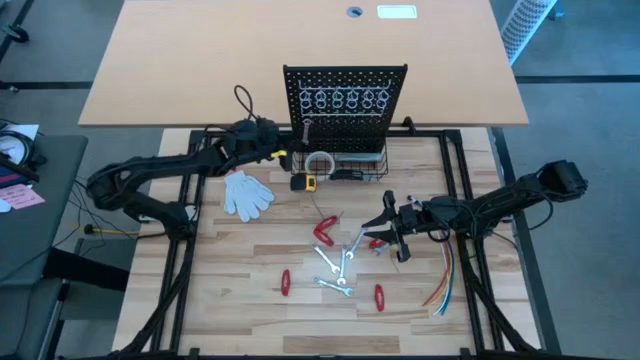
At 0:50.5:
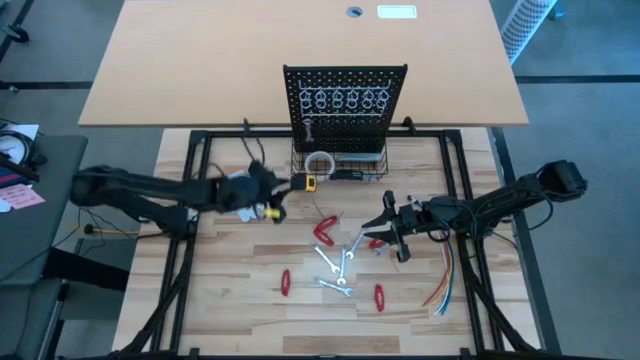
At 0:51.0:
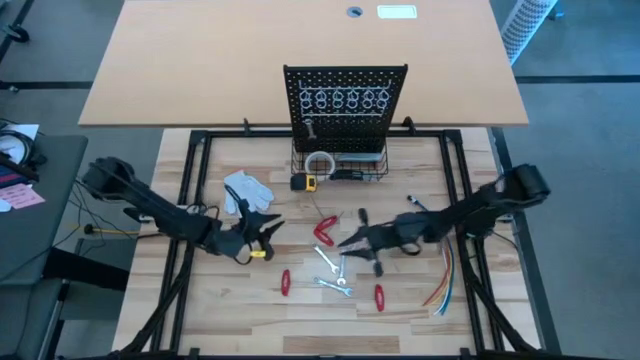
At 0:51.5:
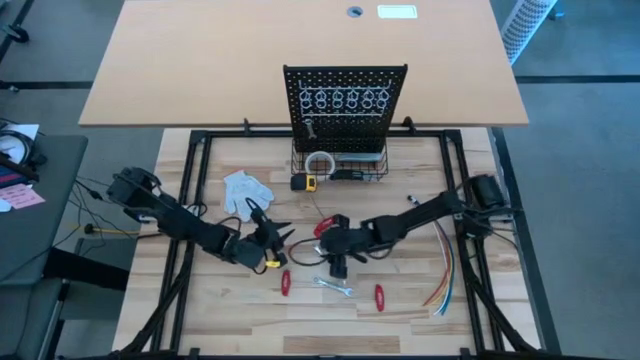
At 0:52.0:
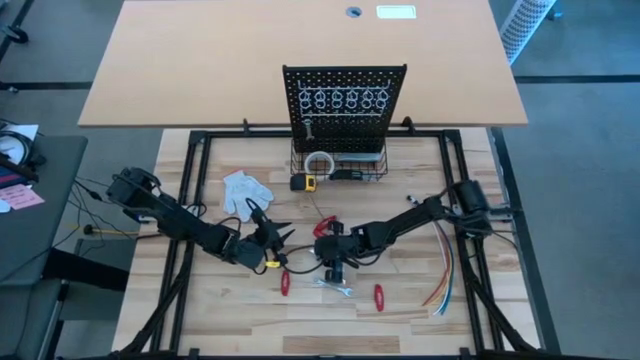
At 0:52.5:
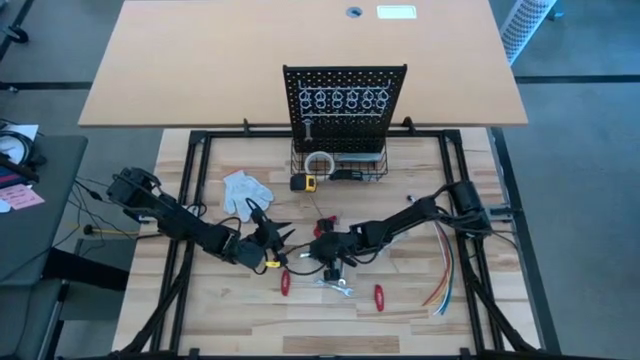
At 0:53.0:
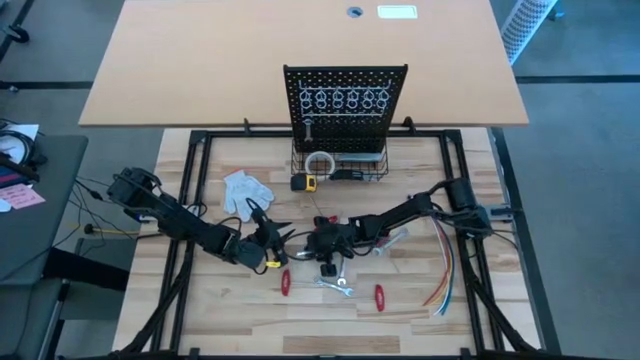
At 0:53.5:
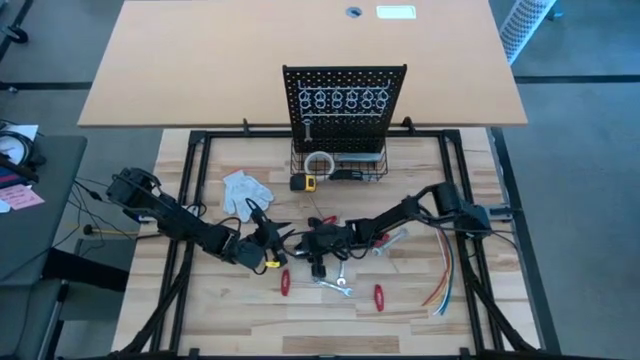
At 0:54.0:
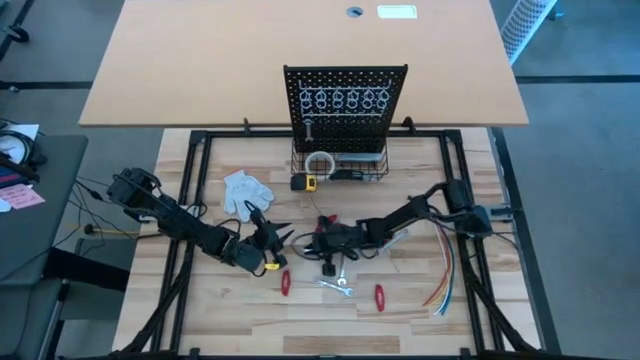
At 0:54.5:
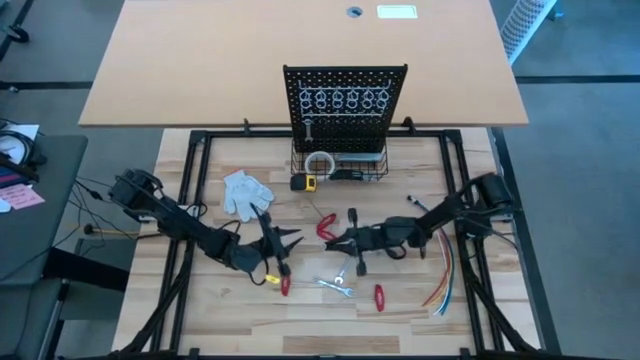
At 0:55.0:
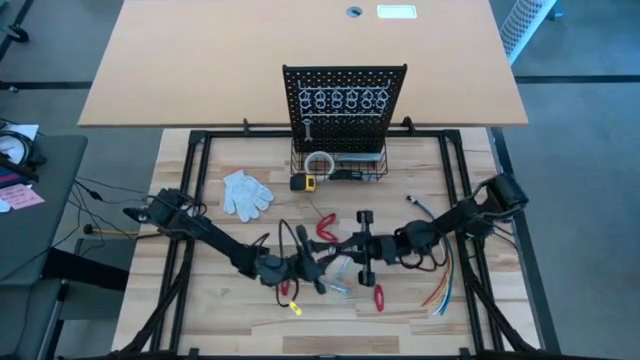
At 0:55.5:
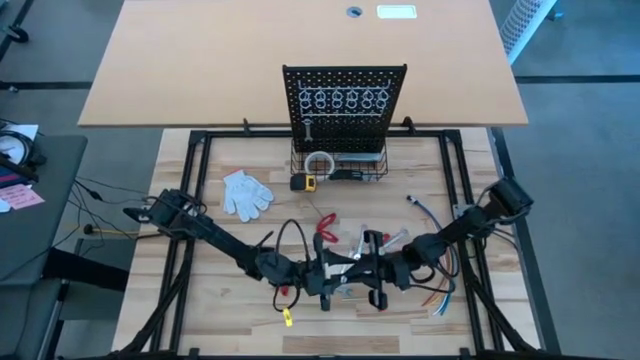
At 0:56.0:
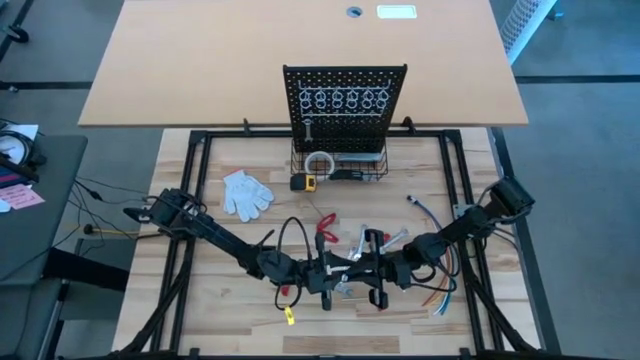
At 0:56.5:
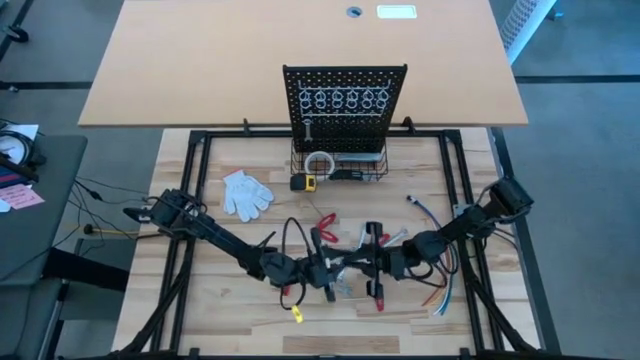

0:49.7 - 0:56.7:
Task: Hang tools onto peg board
Hang the silver wrench on the peg board

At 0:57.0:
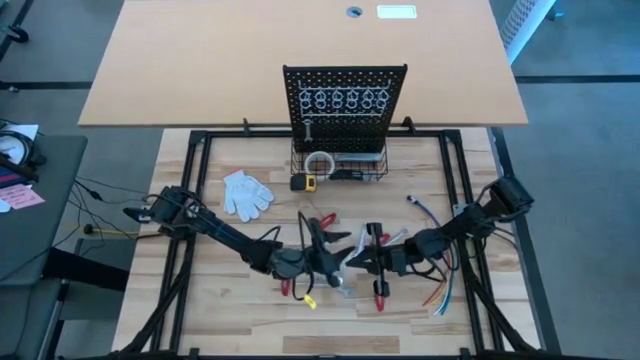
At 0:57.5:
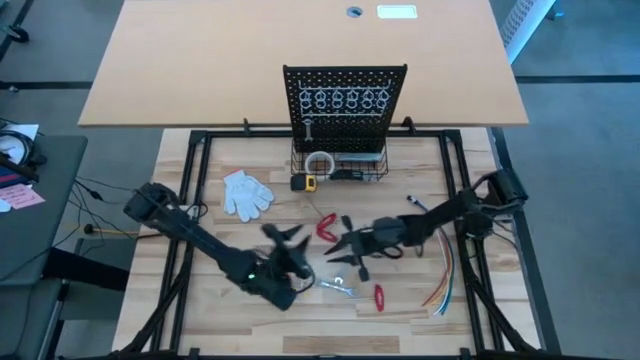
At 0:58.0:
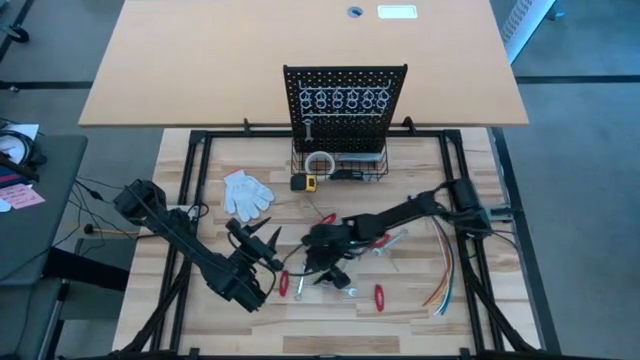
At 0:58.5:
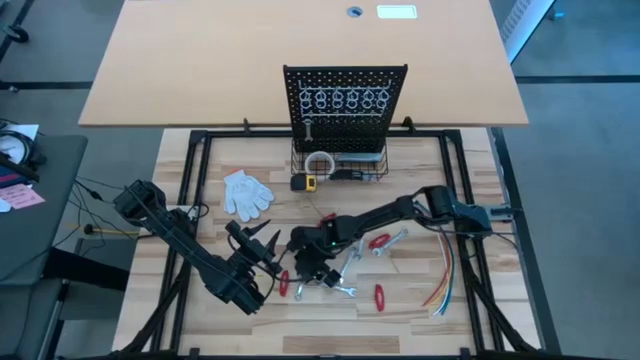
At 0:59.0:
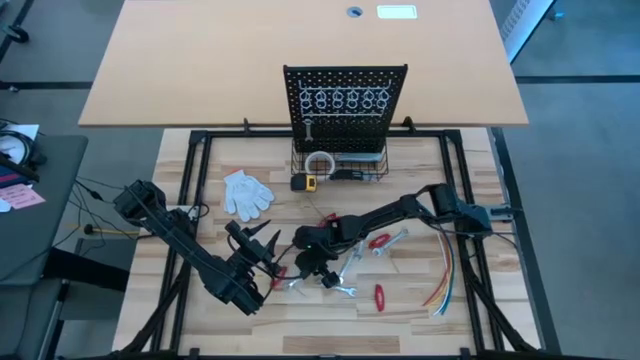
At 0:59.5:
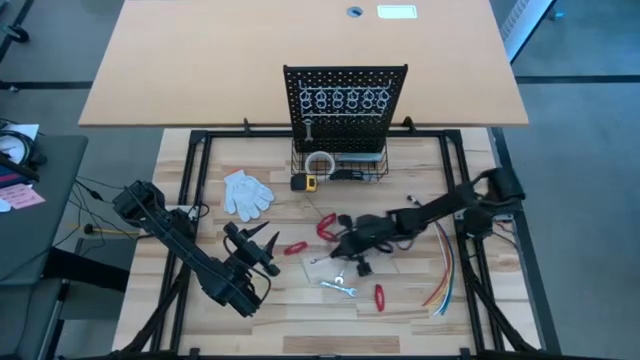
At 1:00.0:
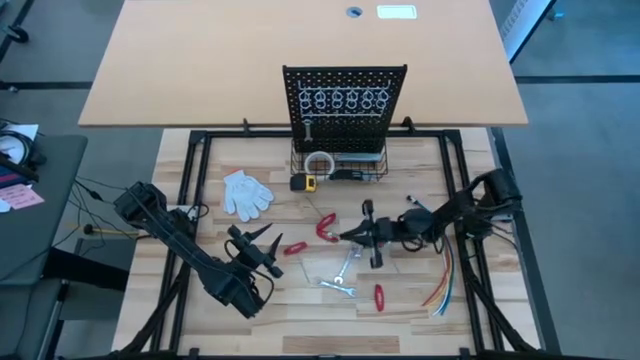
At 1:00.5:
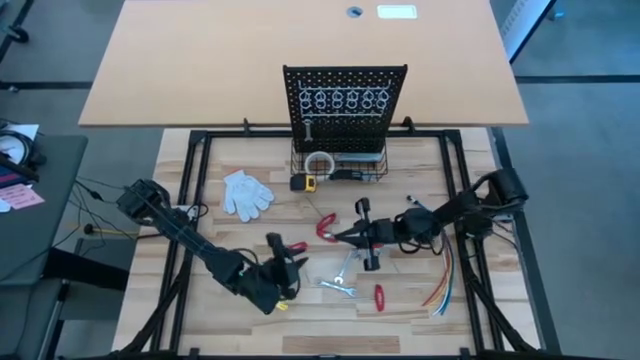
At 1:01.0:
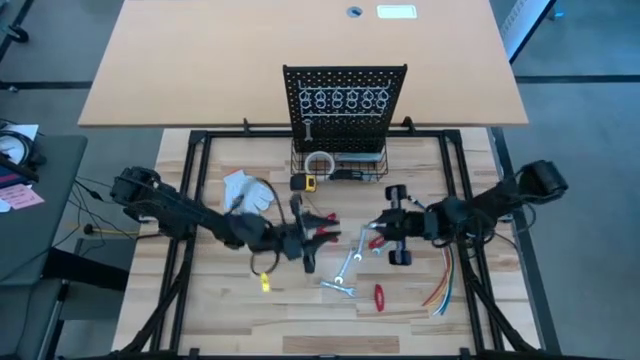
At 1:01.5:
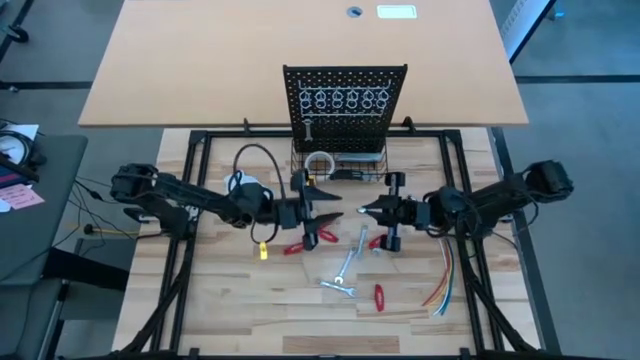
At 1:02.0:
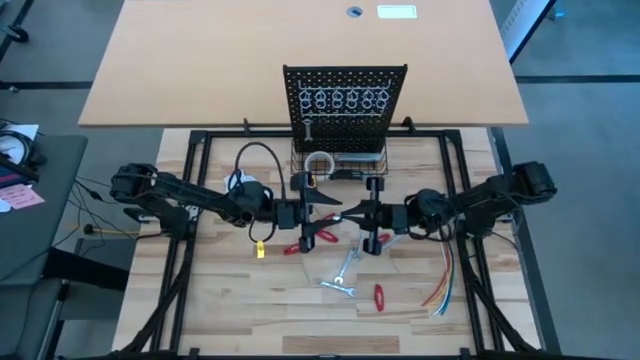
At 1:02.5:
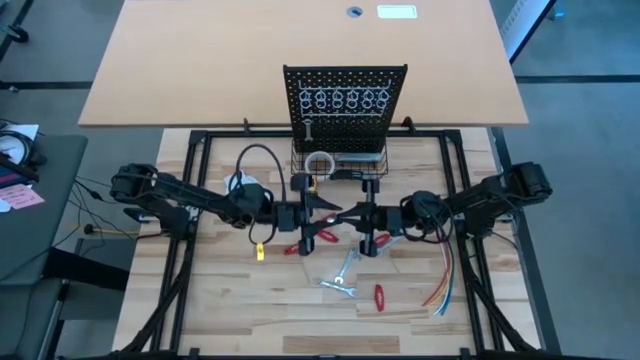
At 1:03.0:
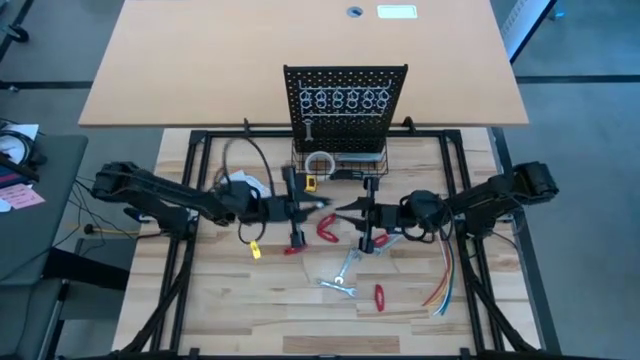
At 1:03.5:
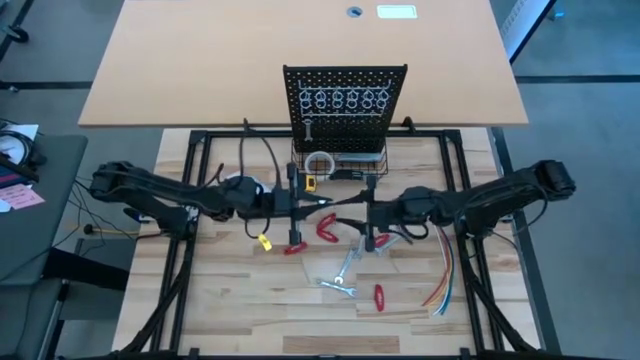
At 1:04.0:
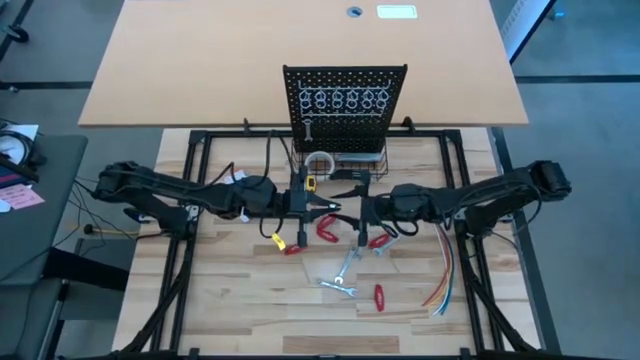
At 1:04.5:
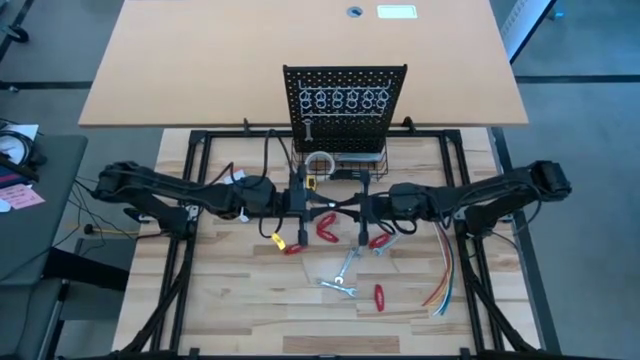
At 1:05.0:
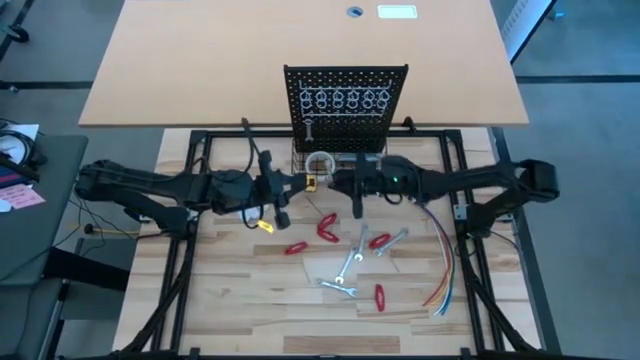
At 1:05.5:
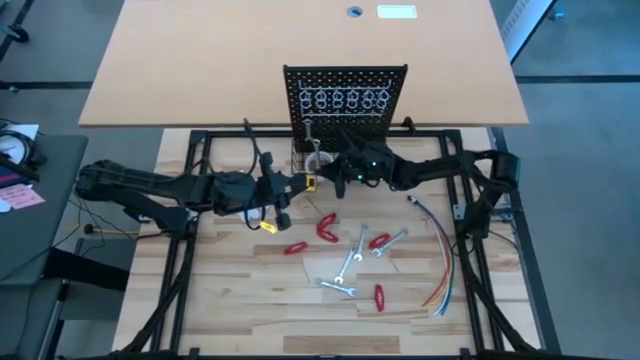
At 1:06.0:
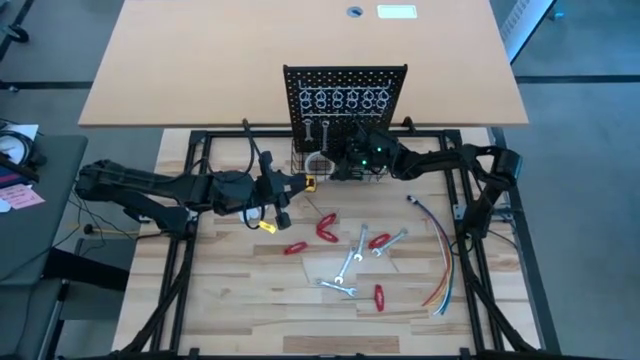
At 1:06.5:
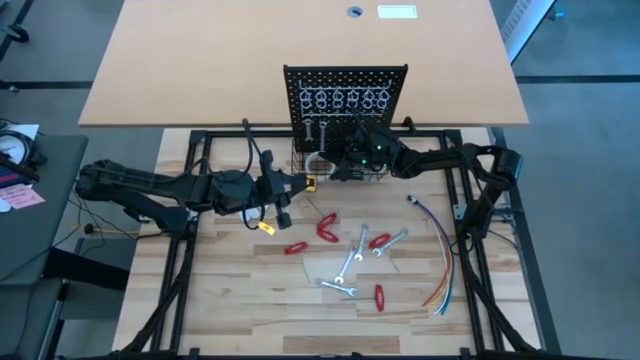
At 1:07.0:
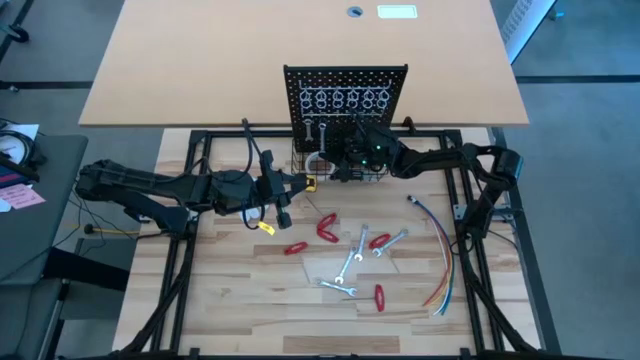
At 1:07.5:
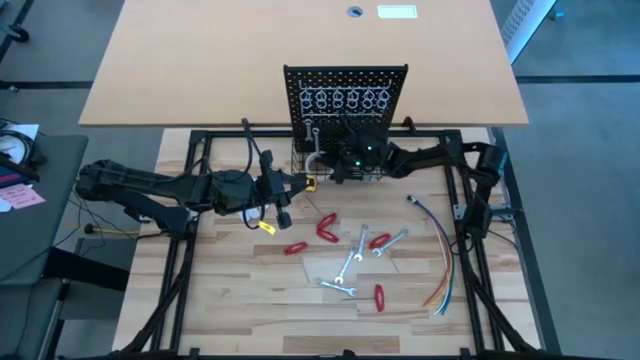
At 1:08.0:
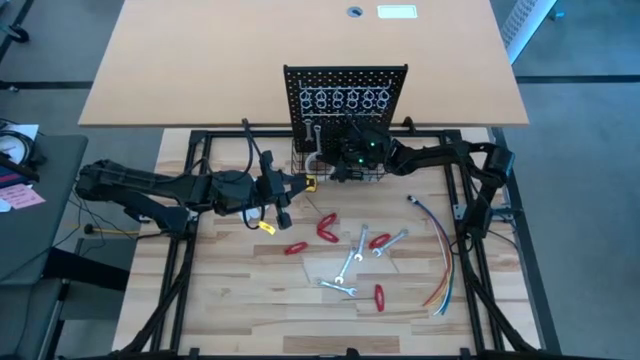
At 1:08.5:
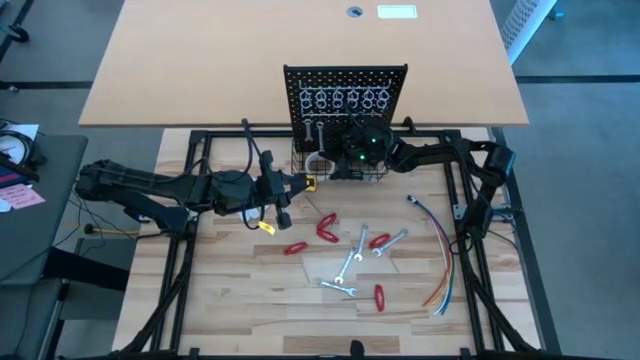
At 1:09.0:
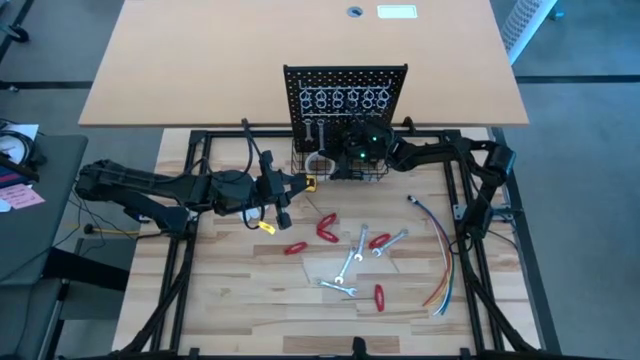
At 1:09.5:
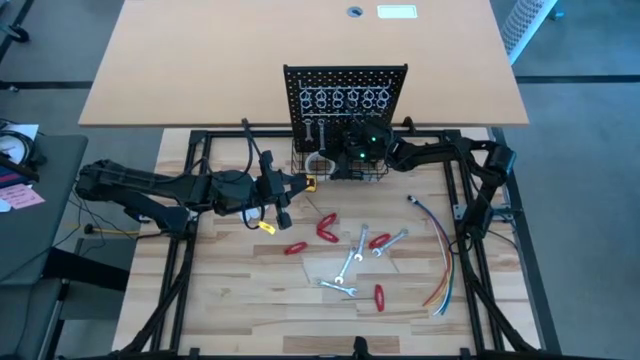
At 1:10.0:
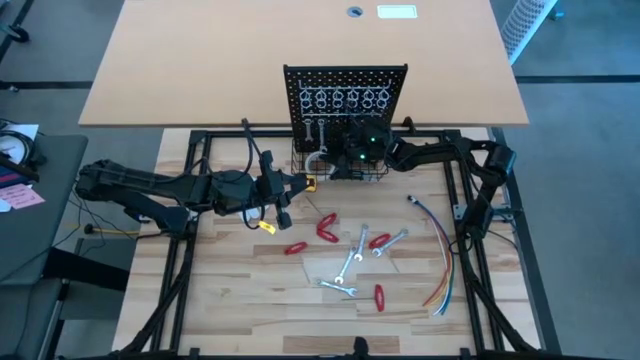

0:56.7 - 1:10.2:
Hang the silver wrench on the peg board

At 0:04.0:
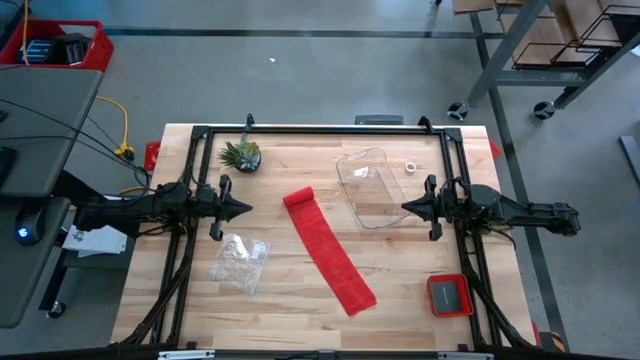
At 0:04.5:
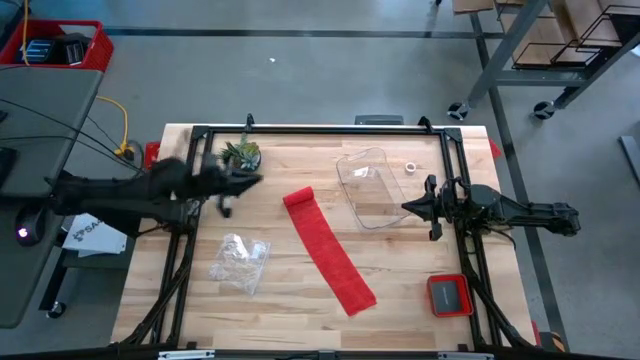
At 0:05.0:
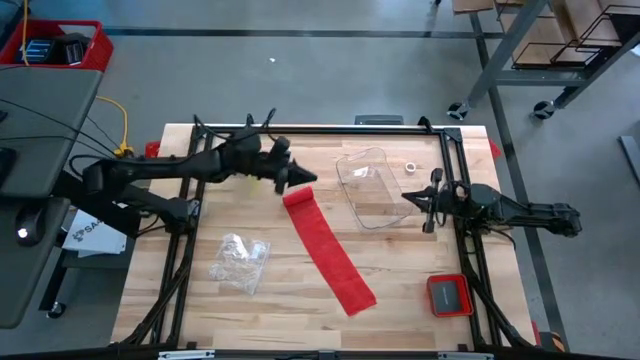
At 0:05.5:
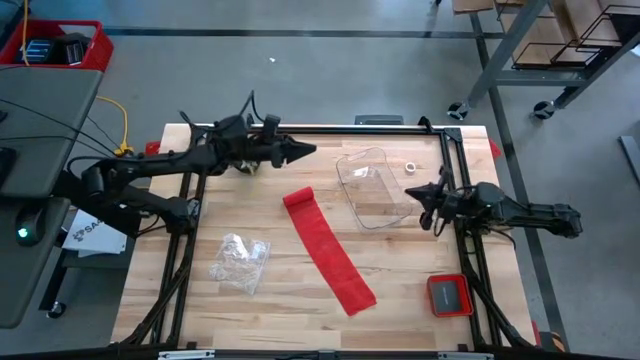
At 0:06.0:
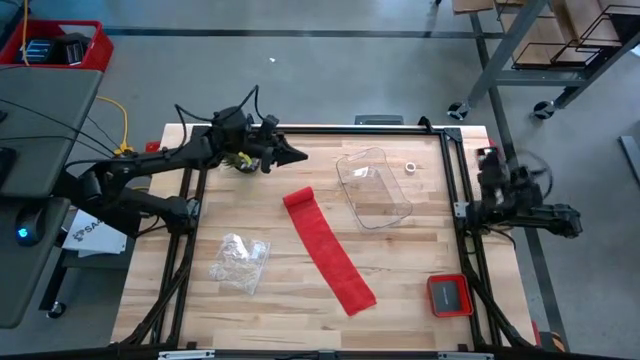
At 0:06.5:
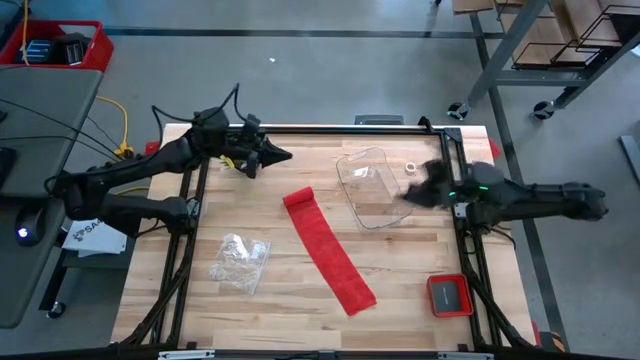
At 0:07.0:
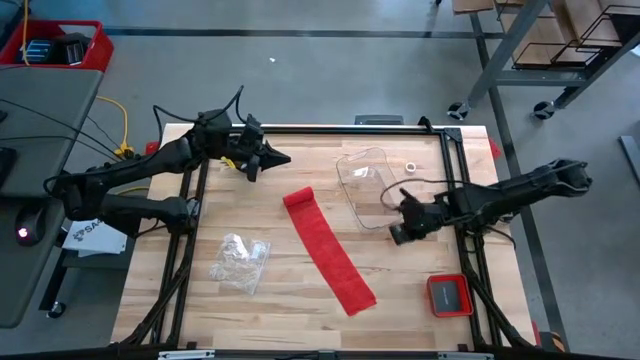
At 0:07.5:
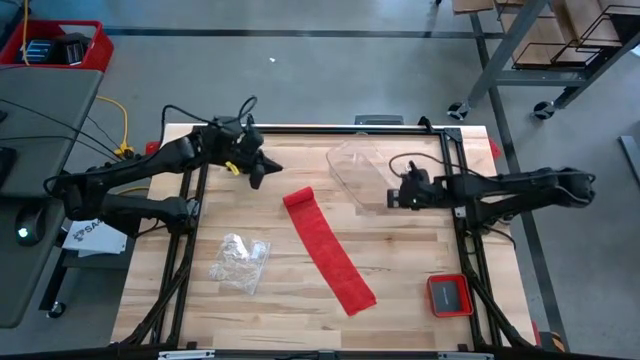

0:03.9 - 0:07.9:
Task: Roll bandage
Adjust the transparent bin
